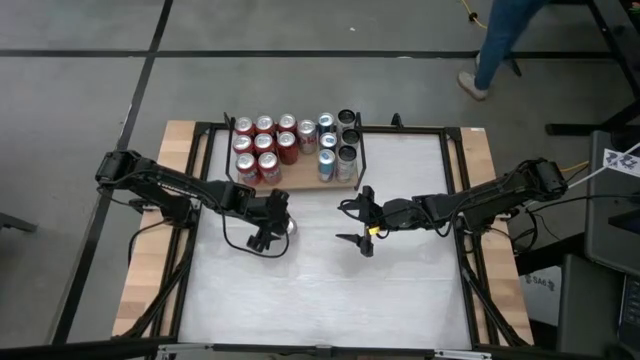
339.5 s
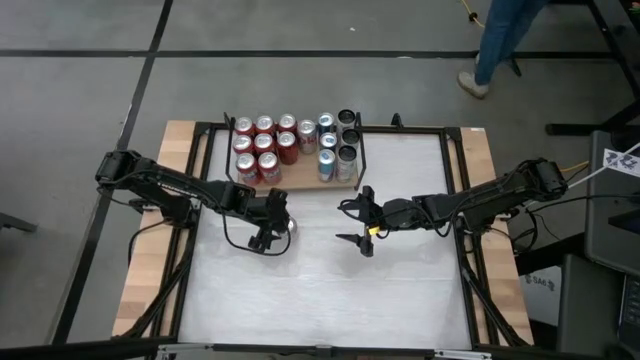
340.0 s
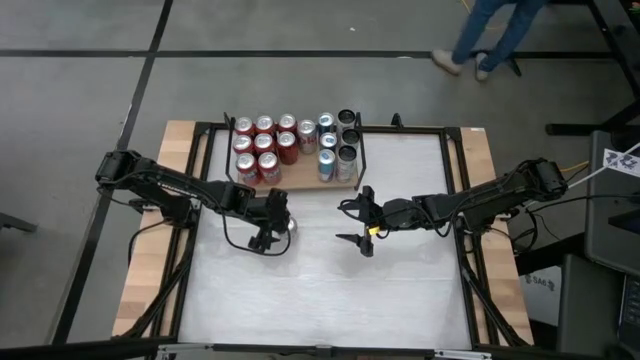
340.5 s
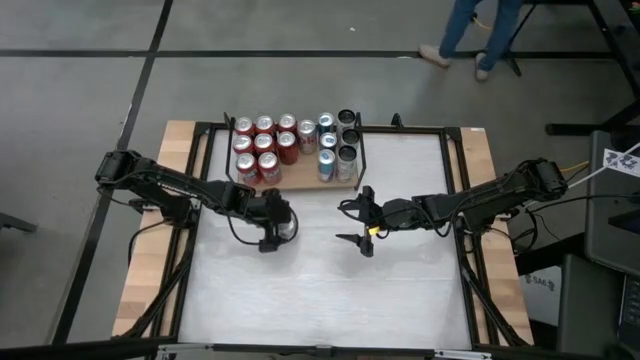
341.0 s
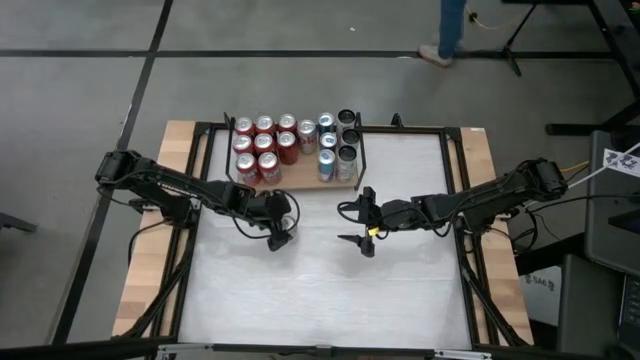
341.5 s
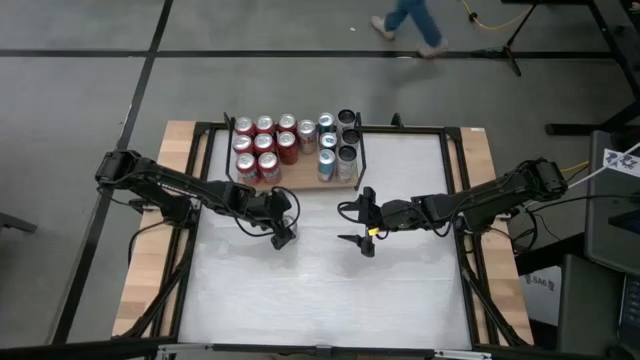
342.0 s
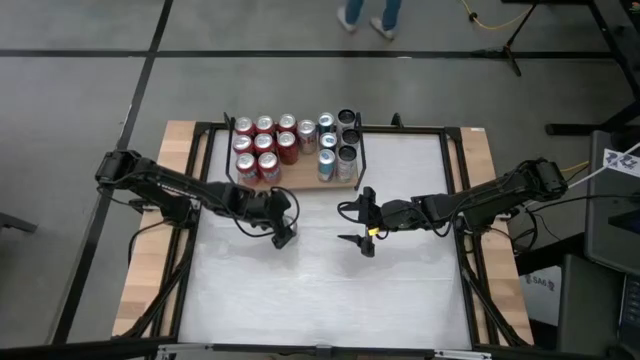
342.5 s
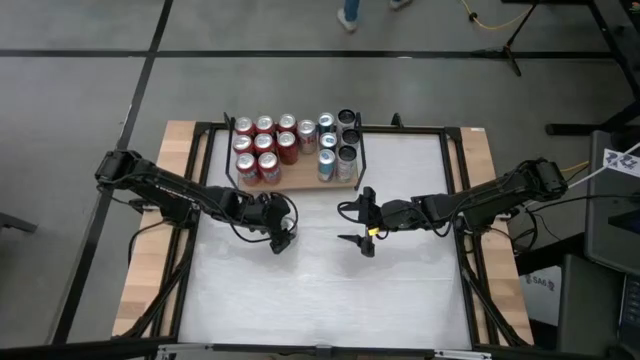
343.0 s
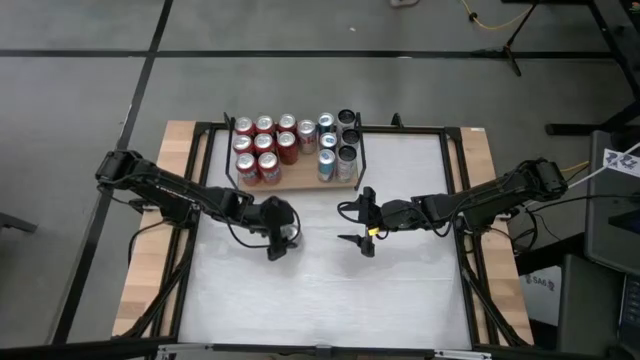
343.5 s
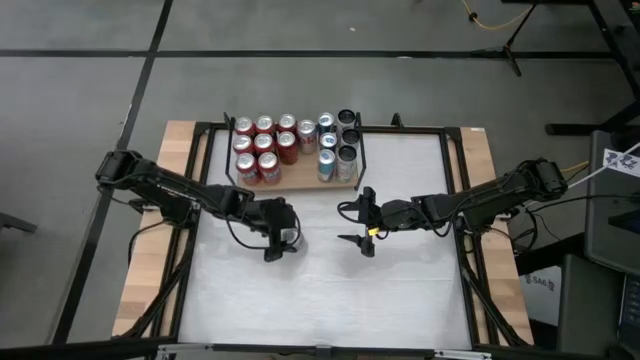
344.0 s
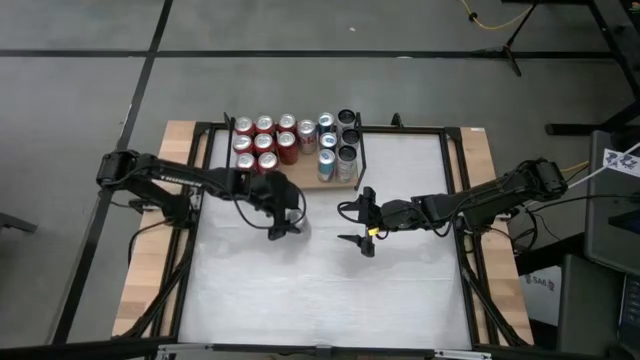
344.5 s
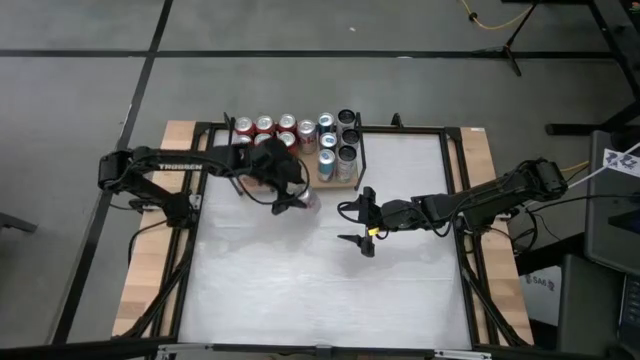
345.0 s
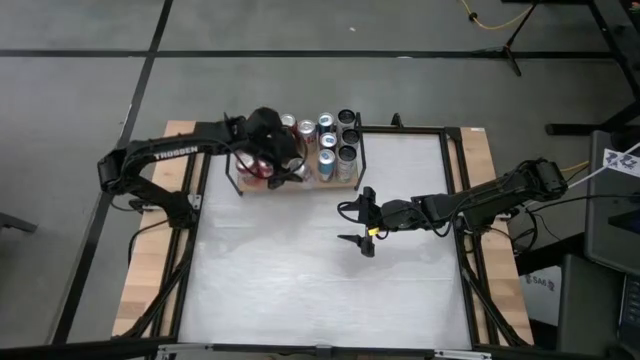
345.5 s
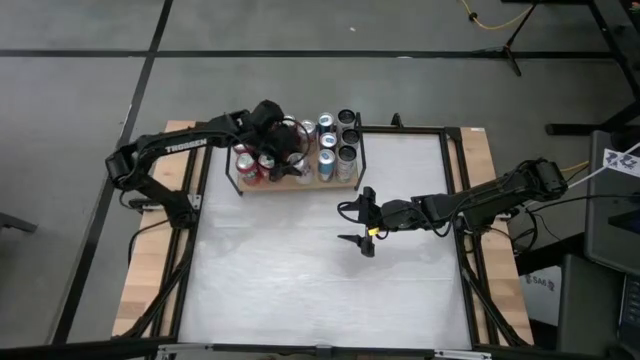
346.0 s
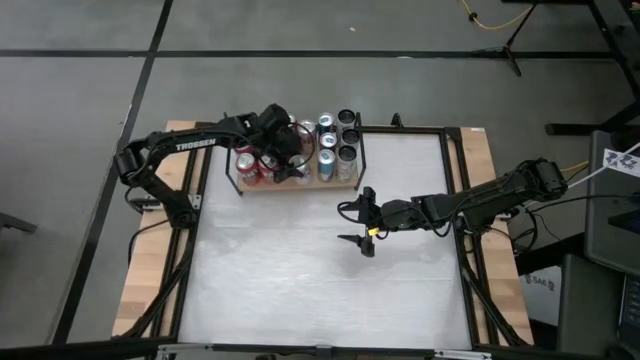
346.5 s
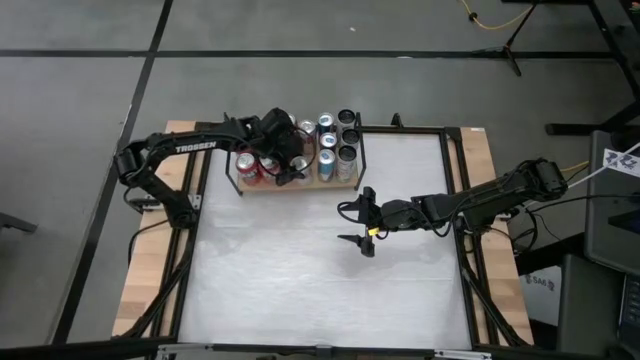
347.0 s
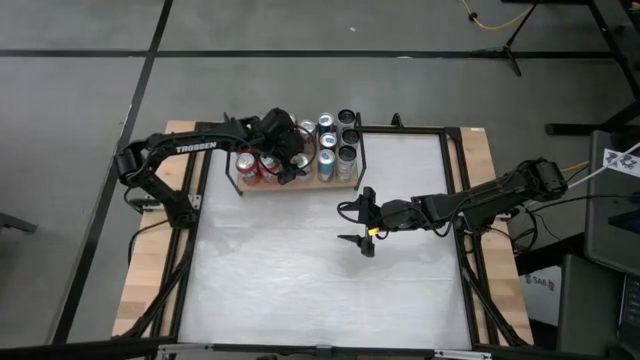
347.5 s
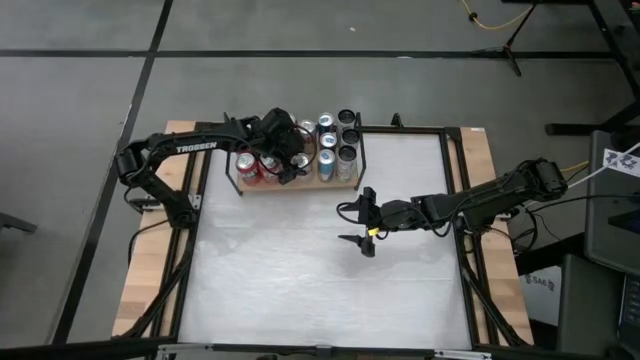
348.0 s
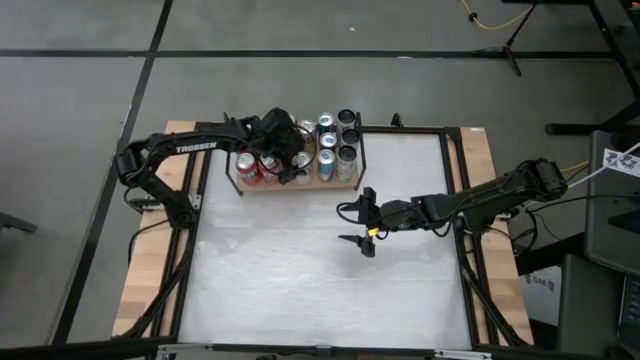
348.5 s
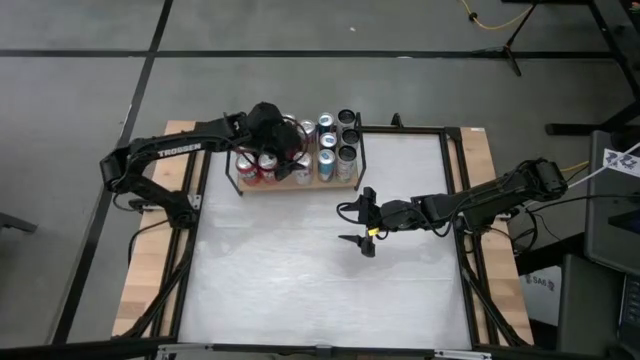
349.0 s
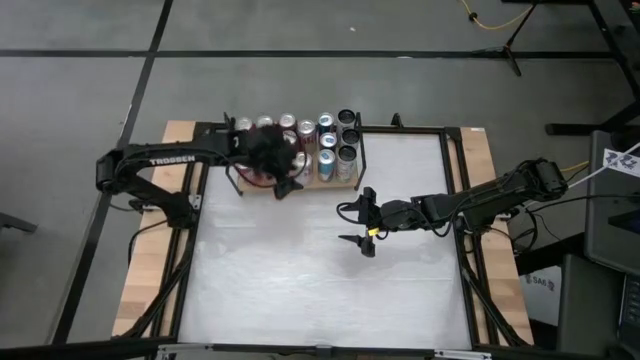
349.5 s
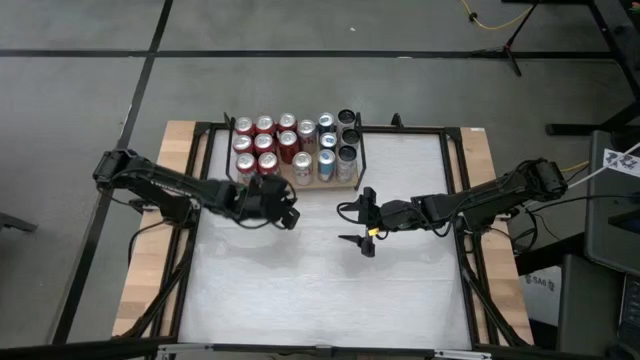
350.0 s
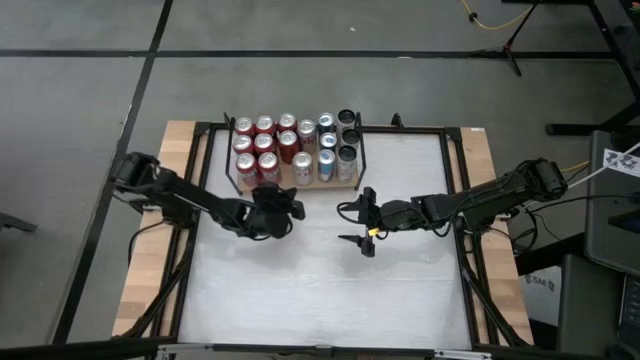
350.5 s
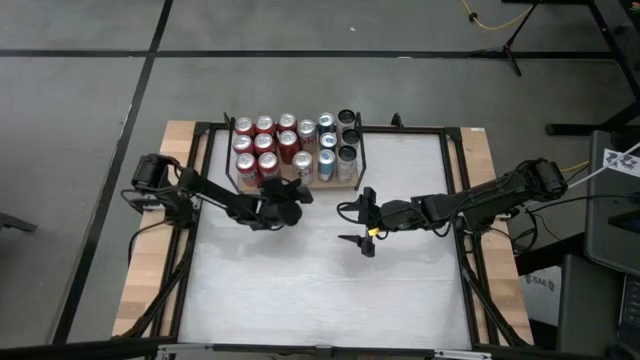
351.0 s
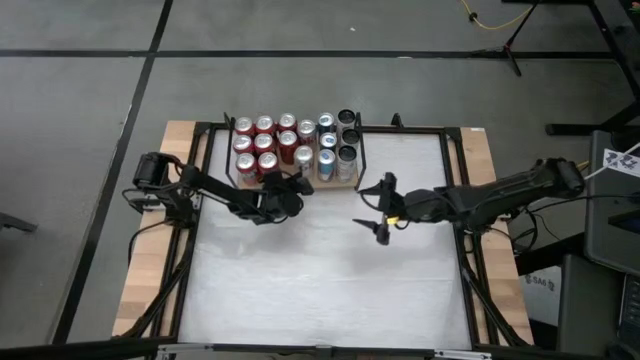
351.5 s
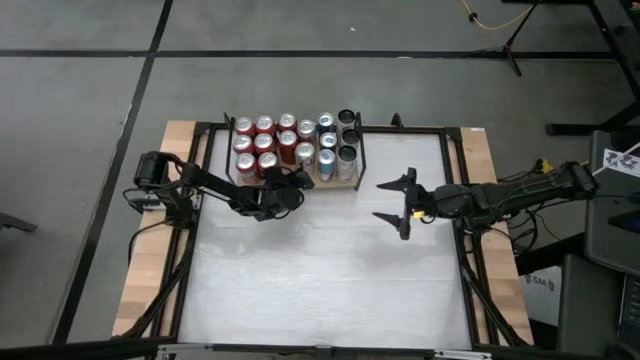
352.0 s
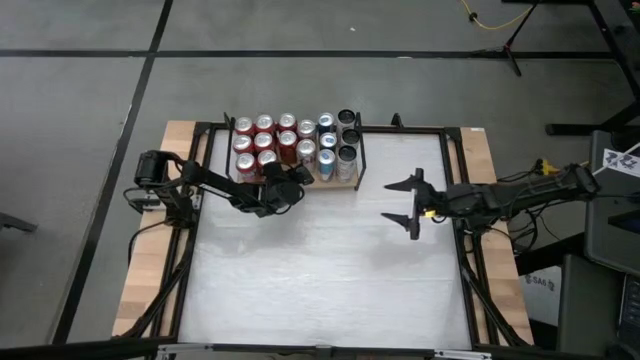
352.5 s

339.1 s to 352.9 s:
Task: Place canned beverage on shelf
Put the red silver soda can on the shelf aligned with the other red silver soda can

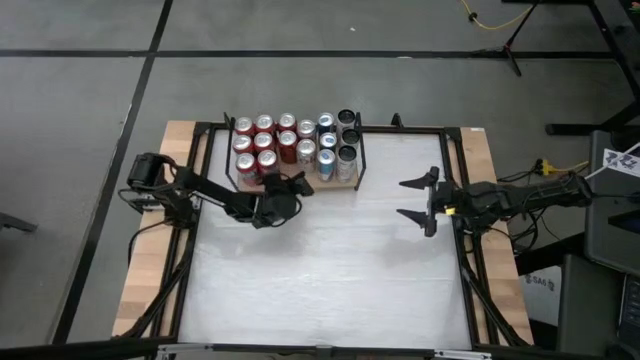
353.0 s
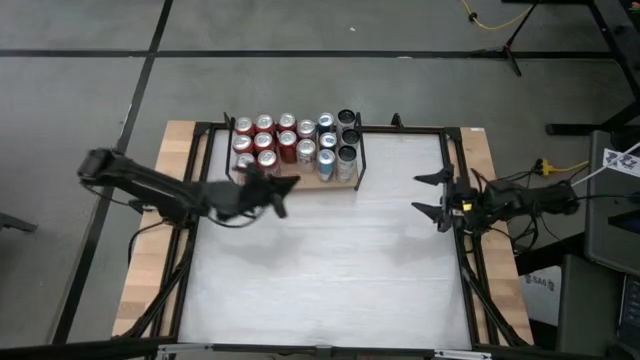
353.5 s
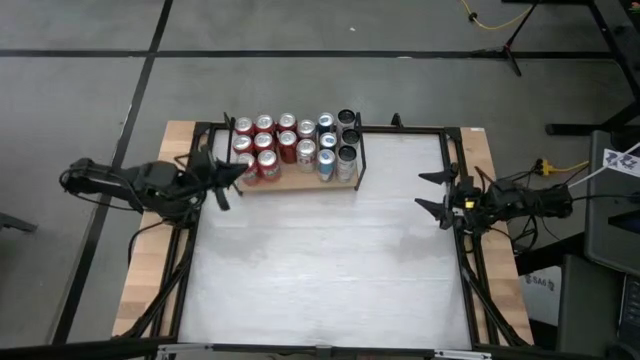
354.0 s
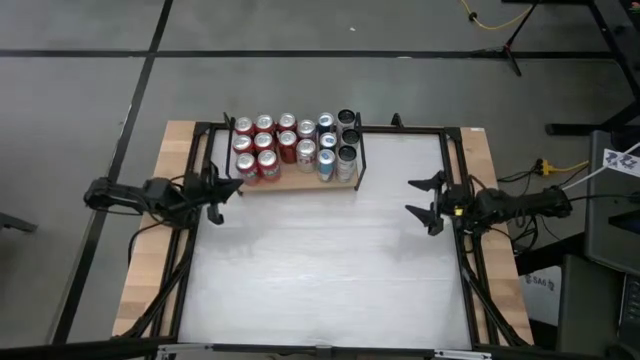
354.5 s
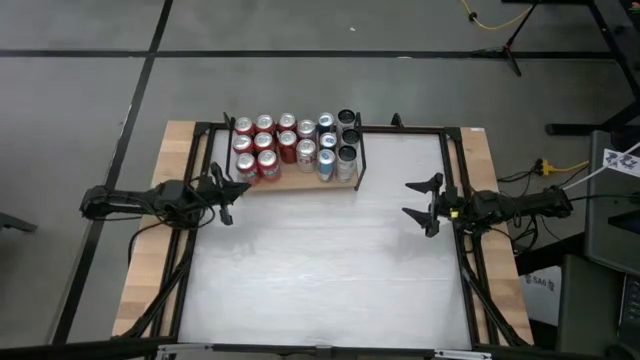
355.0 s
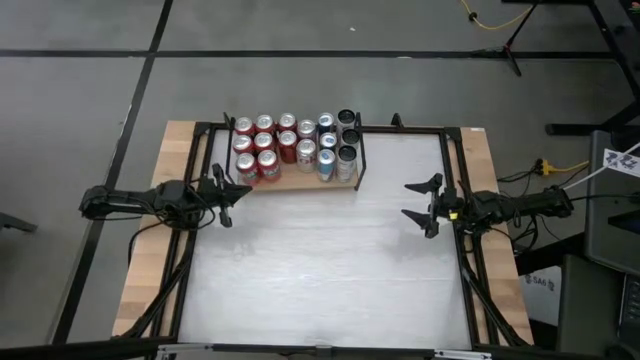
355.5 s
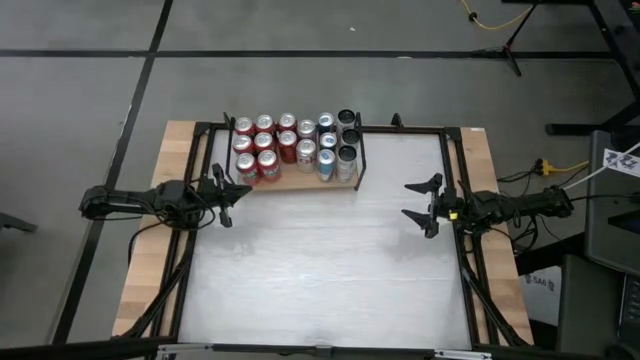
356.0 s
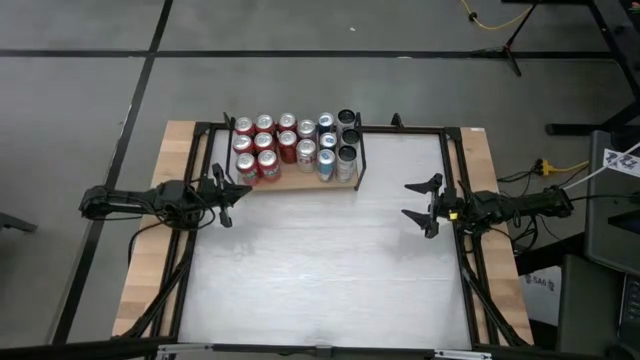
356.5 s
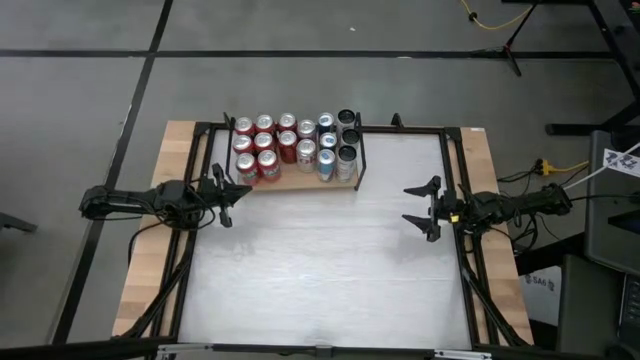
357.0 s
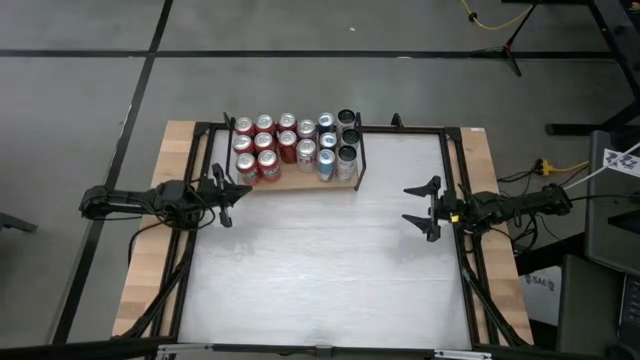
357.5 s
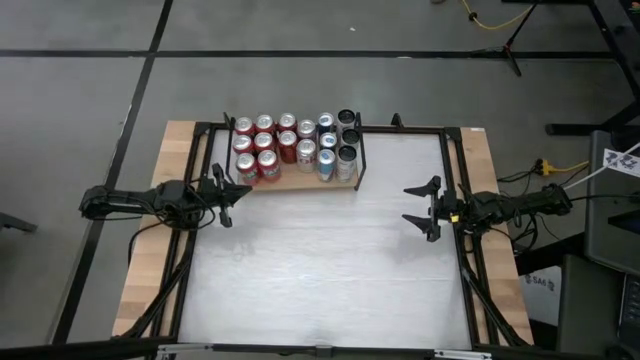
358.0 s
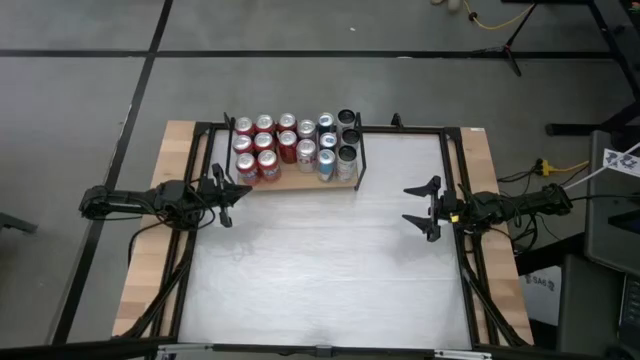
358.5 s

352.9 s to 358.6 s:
Return to Home Position

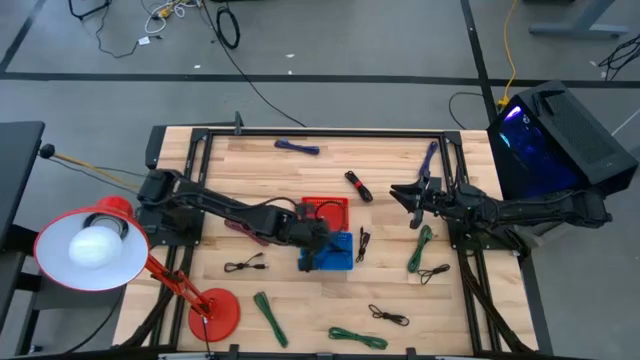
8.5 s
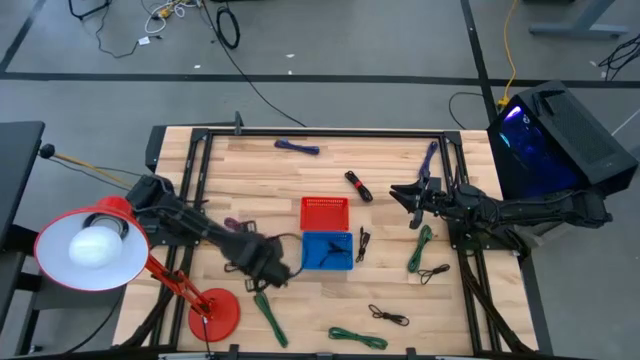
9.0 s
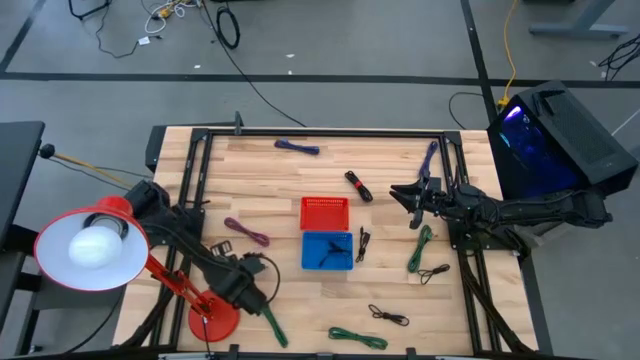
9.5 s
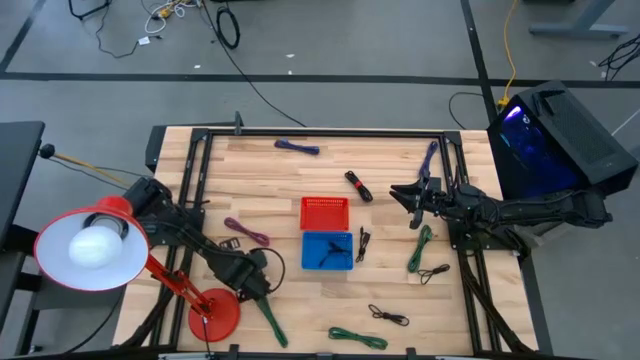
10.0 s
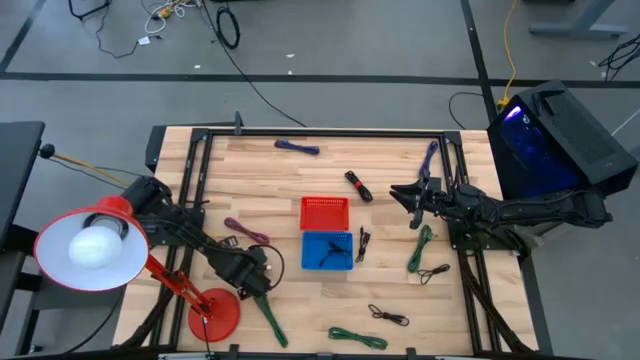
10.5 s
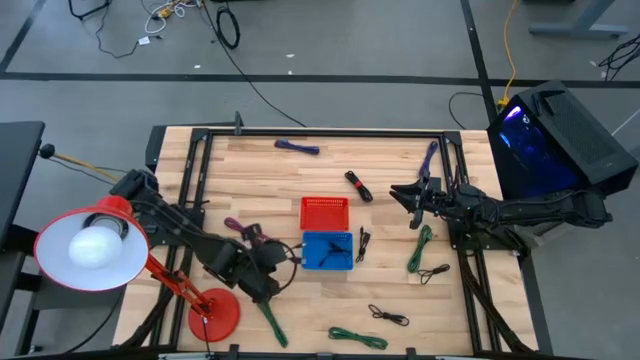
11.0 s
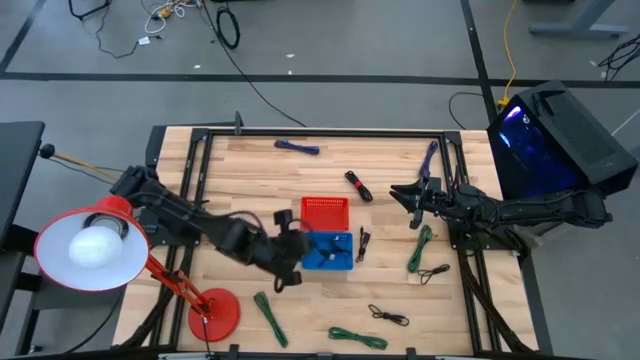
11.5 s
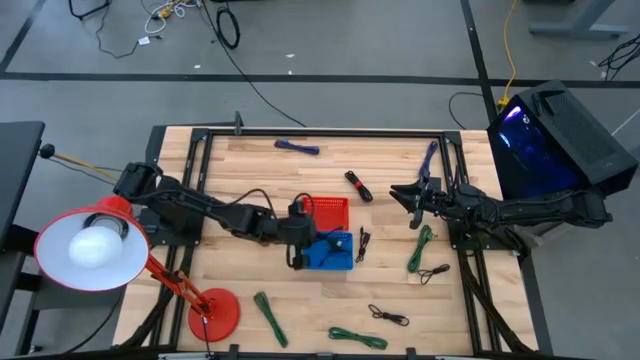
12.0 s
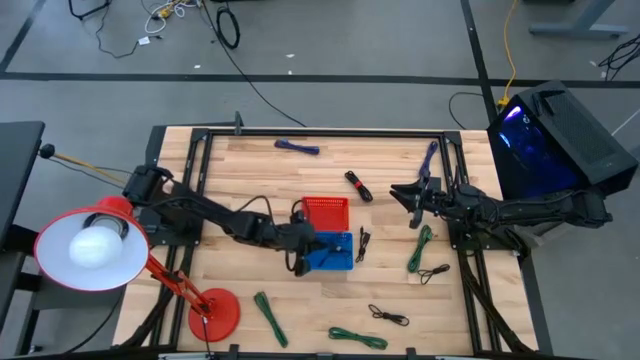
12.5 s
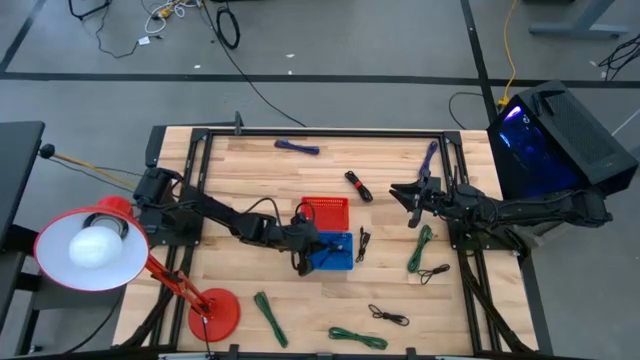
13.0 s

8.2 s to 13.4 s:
Task: Pick & Place USB Port
Put the black charger cable into the blue bin
